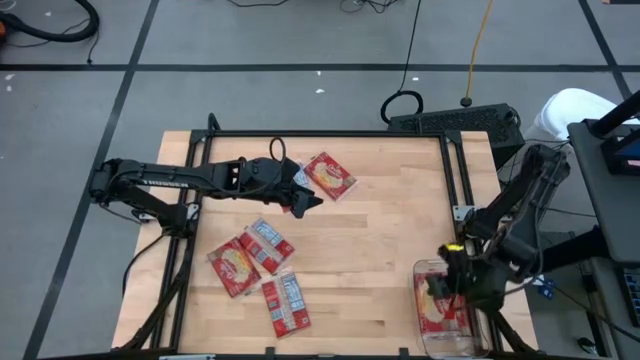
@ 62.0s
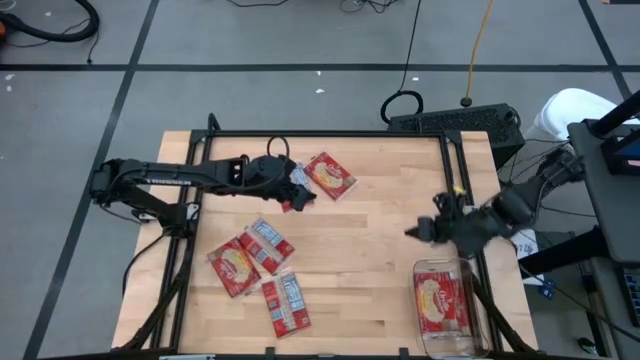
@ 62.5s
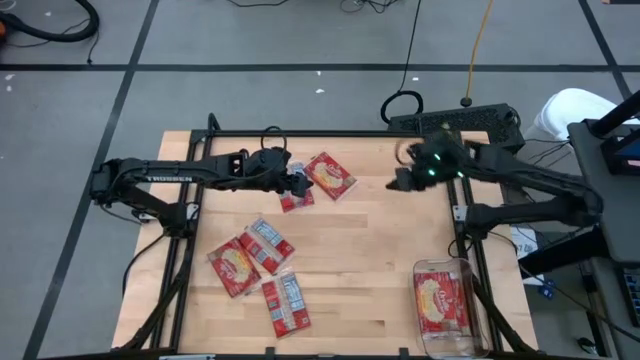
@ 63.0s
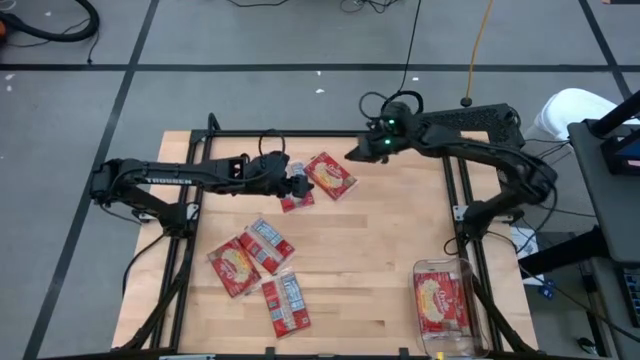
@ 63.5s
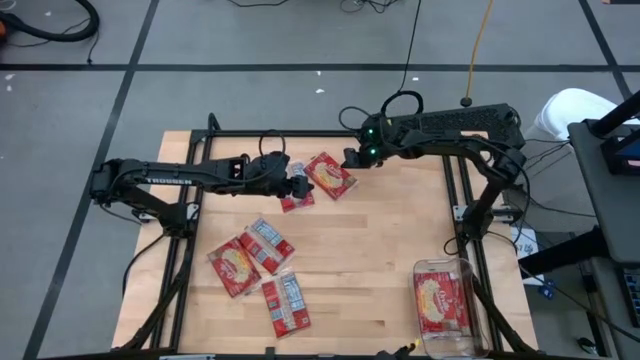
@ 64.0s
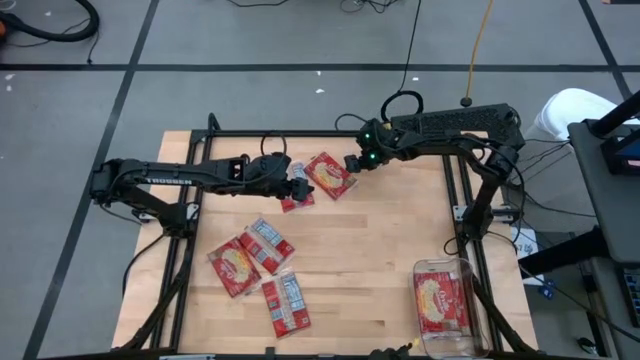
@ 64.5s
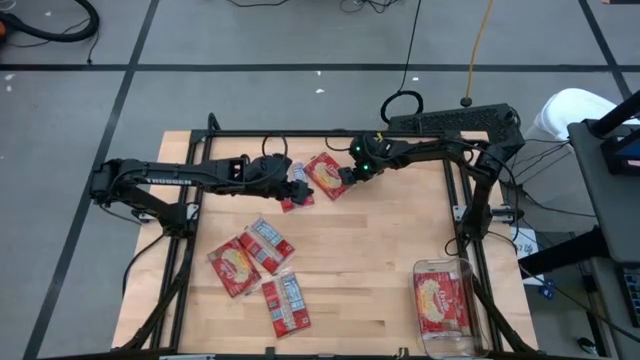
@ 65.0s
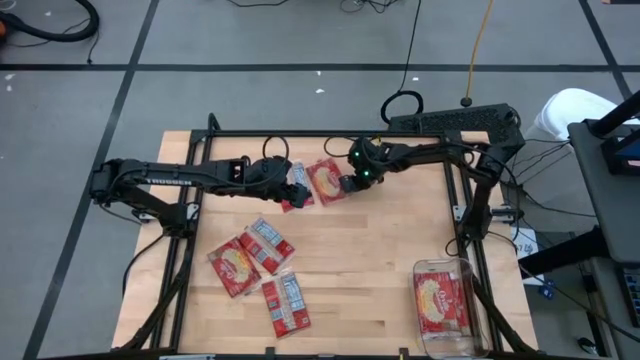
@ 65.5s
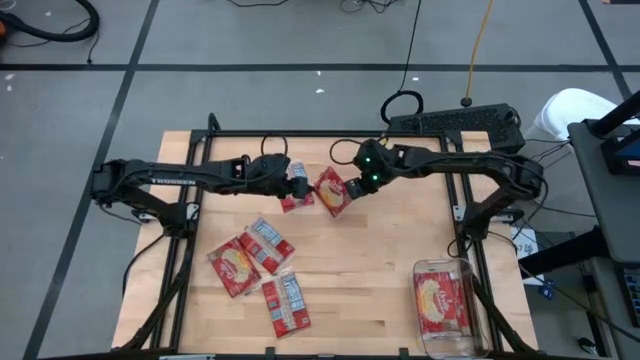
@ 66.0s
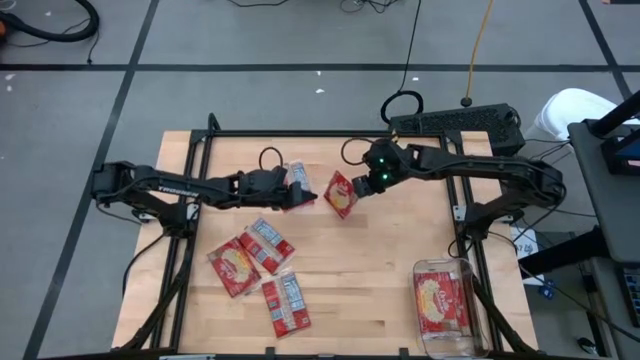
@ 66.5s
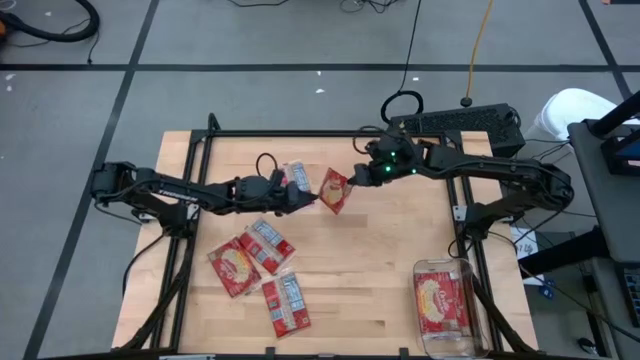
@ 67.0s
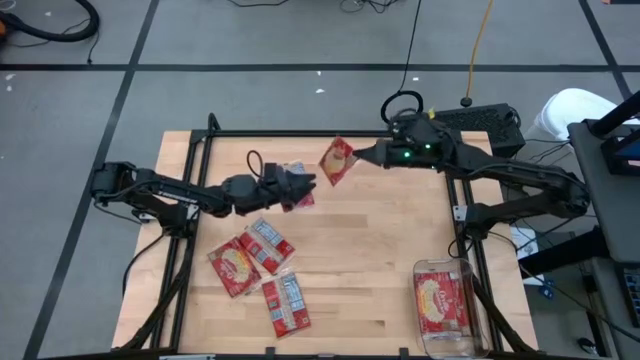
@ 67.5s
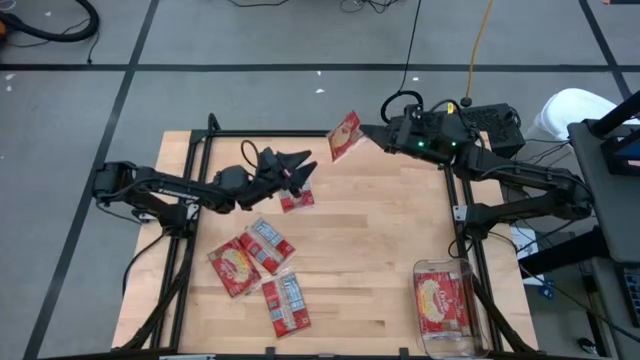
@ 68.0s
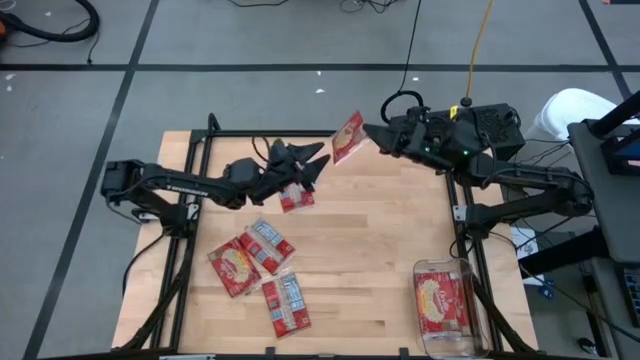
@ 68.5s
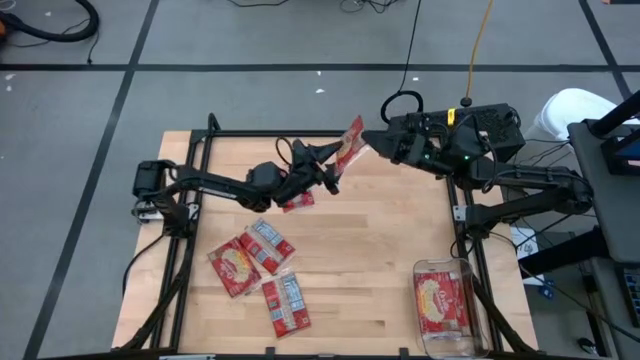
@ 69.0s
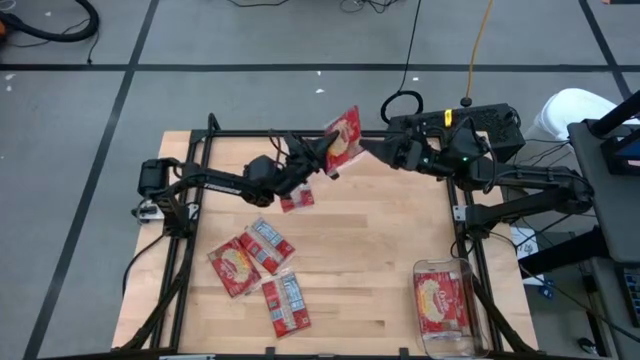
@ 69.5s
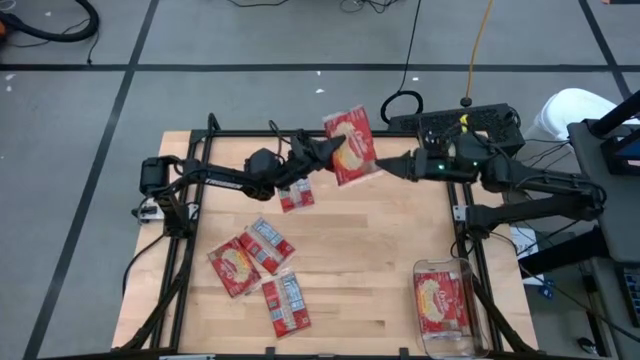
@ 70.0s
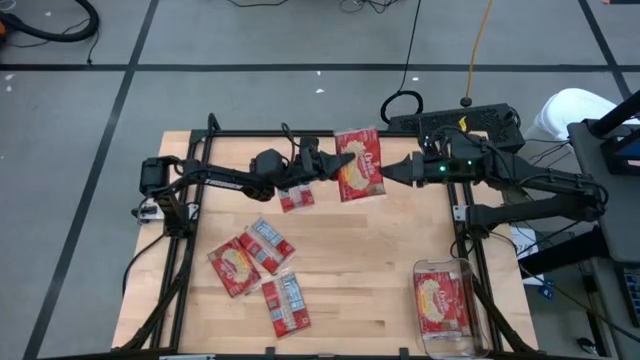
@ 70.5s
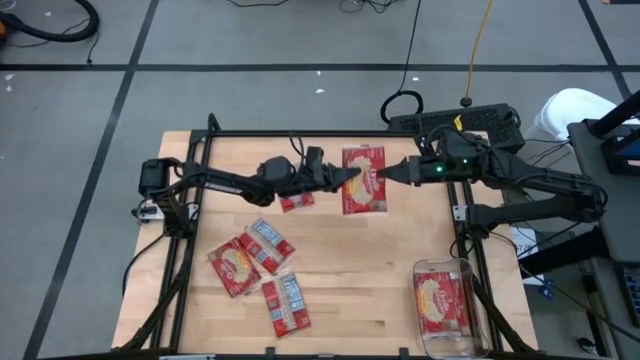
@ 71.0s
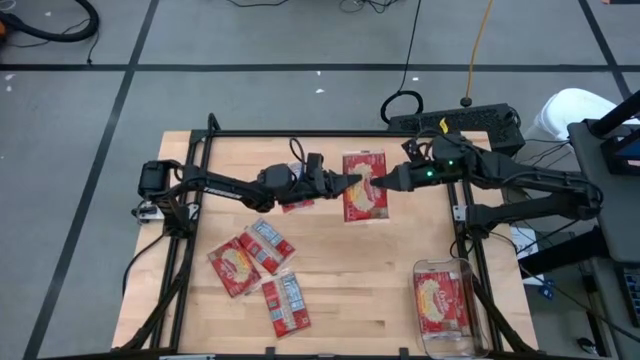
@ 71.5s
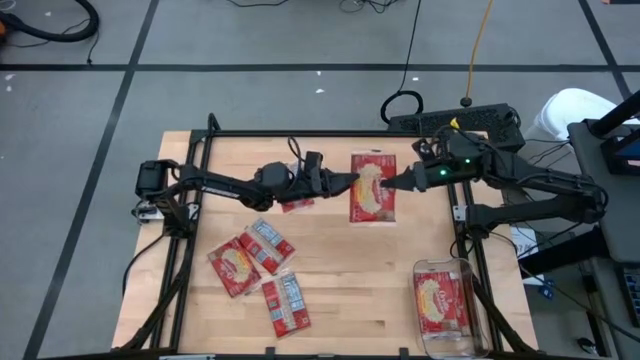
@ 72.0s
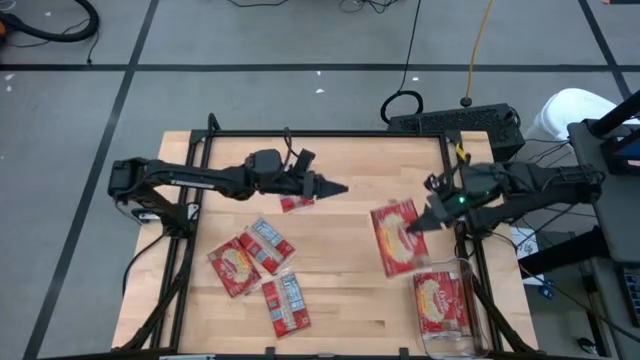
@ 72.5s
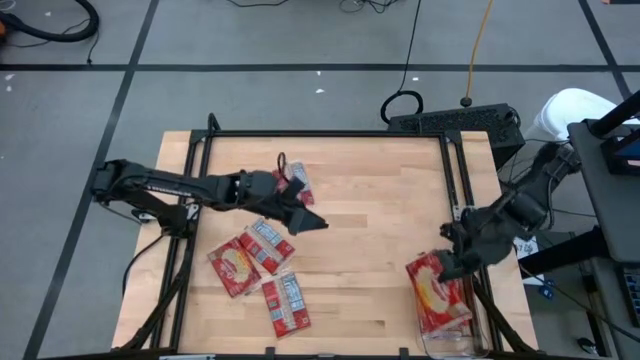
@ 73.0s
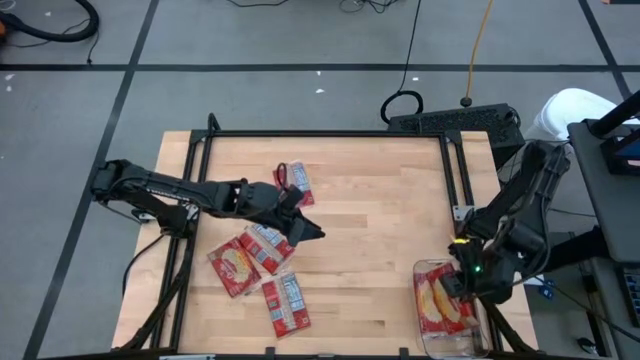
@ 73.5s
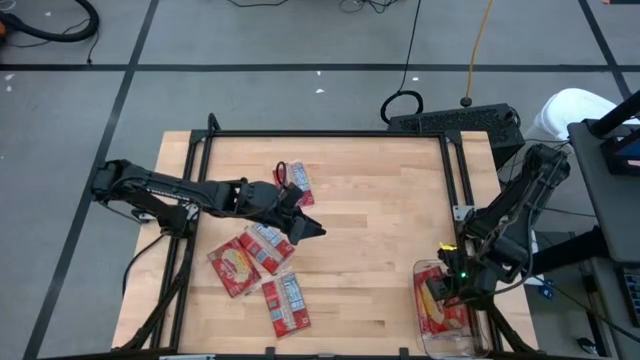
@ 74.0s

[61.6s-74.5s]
Task: Sort popcorn bags into baskets
Put the popcorn bag into the transparent bin

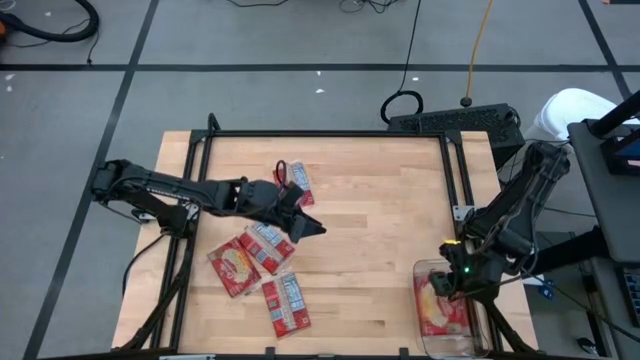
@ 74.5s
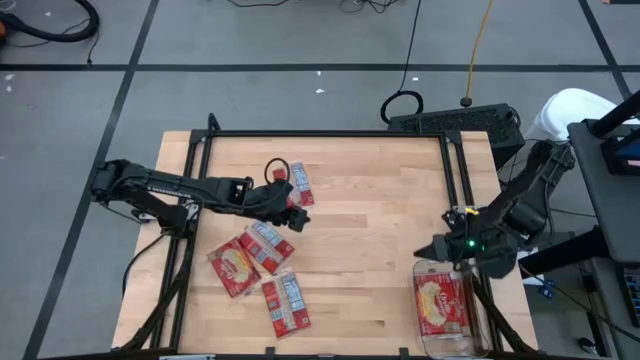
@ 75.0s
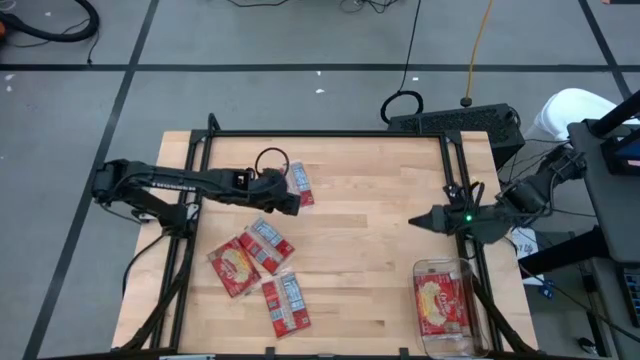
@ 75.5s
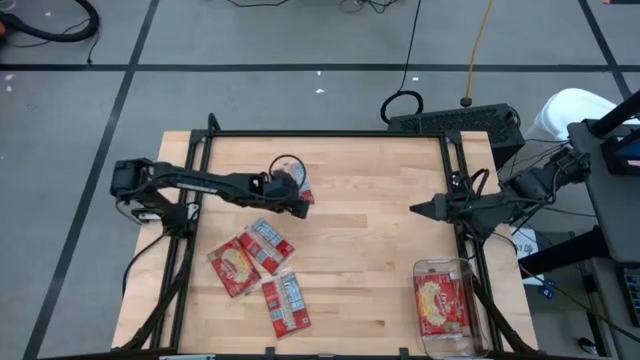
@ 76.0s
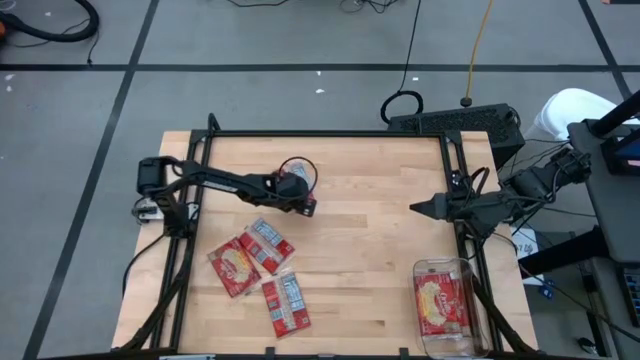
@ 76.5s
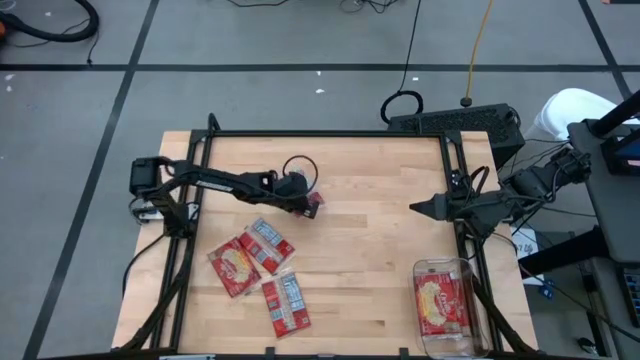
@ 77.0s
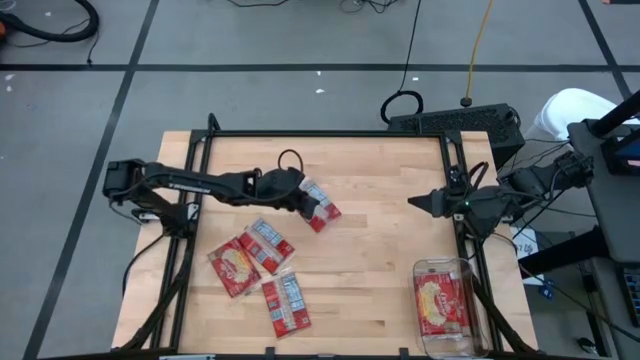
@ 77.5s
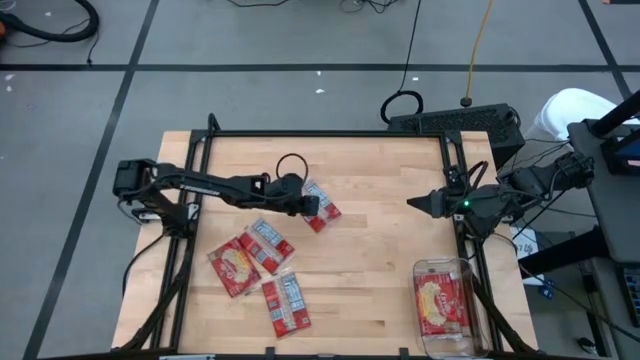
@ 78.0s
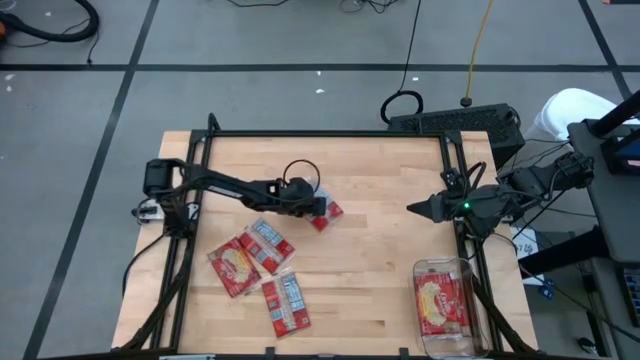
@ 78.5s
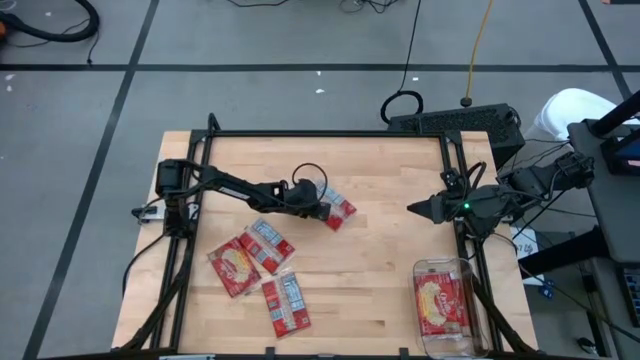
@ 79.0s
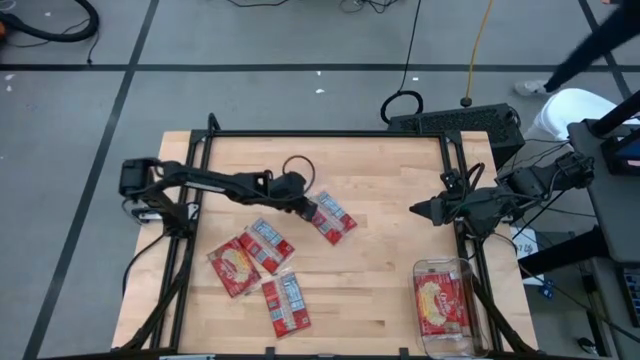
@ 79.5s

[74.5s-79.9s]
Put the popcorn bag into the transparent bin

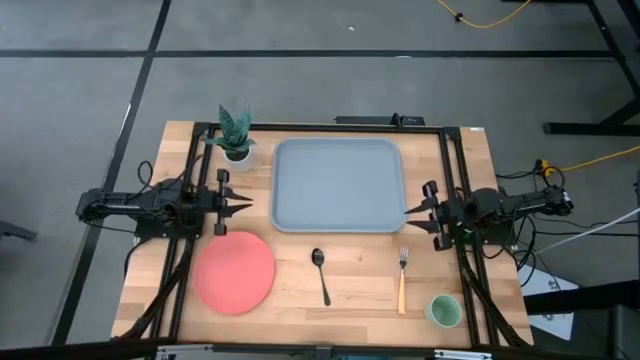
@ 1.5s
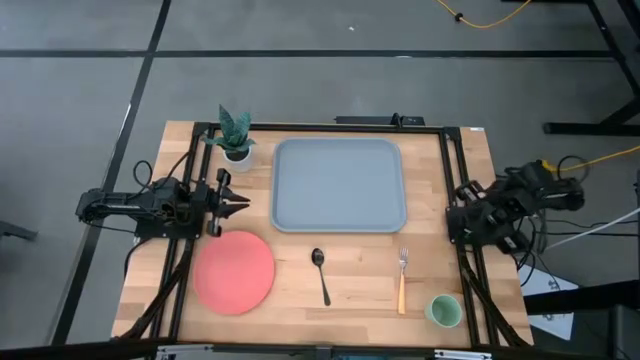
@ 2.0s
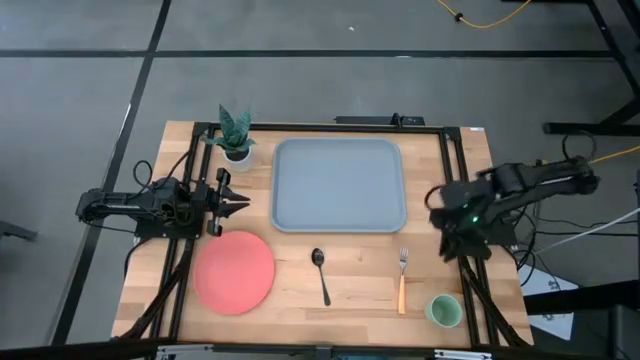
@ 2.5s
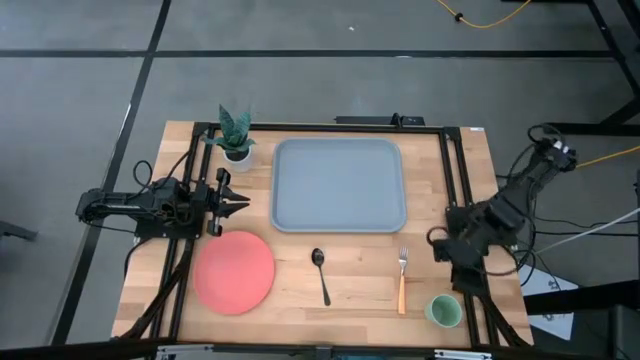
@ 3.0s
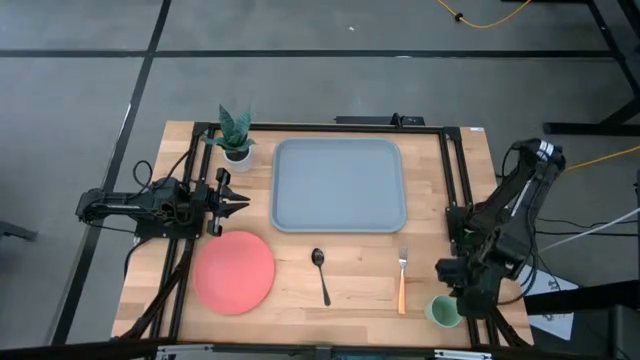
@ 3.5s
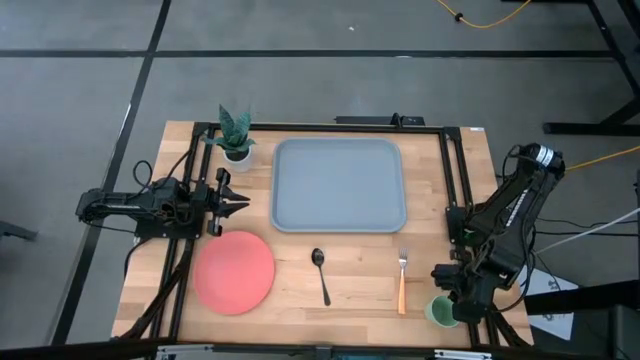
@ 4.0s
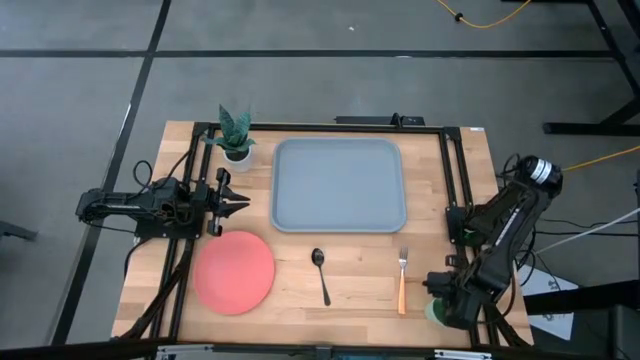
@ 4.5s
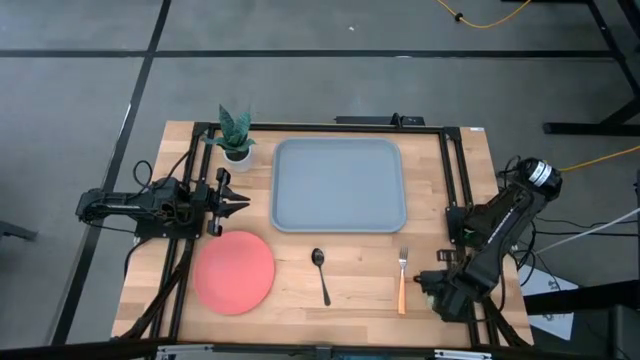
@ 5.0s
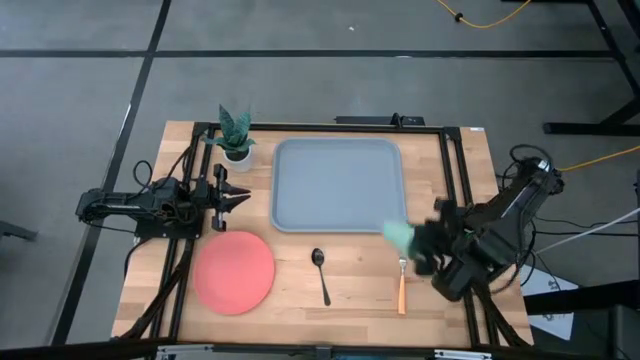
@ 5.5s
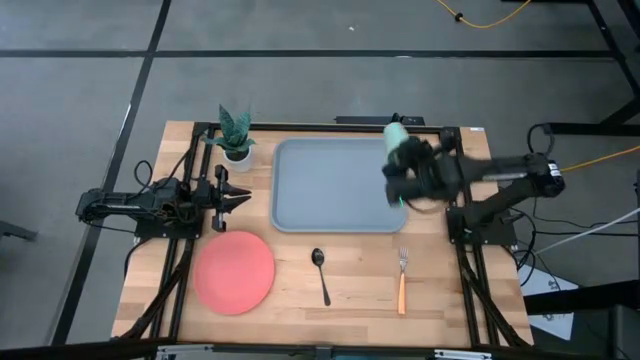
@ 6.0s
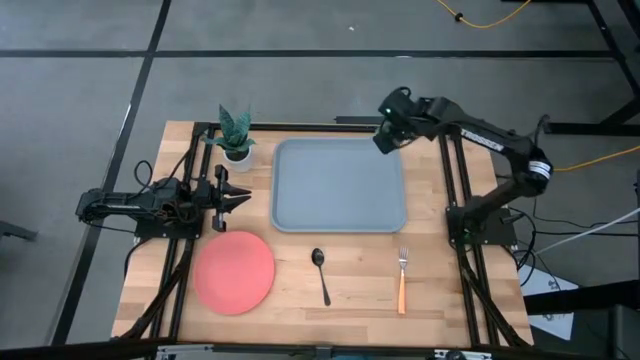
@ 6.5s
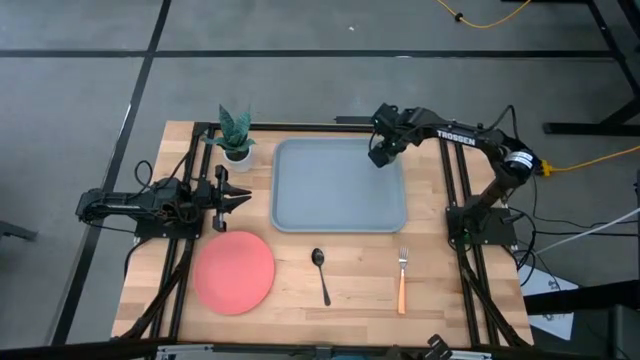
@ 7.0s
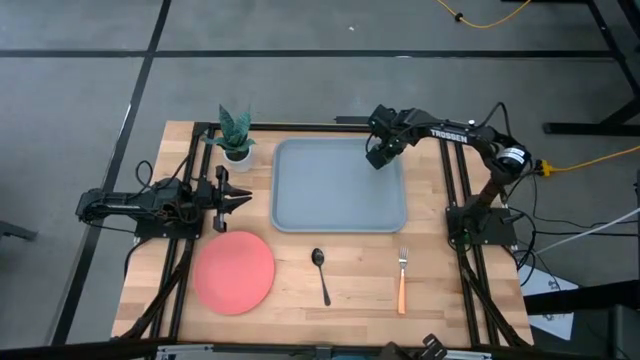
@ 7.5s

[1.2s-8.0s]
Task: Pick and place plate/cup/fork/spoon on tray
Put the green cup to the top right of the blue tray
